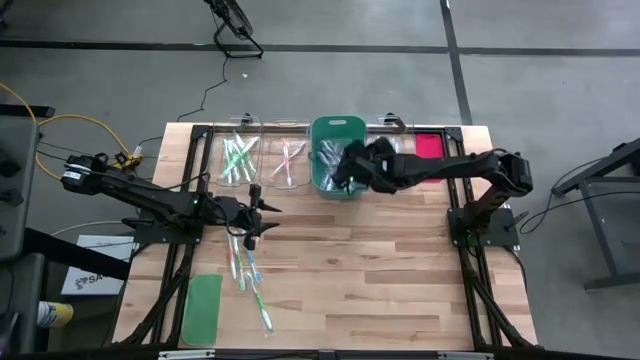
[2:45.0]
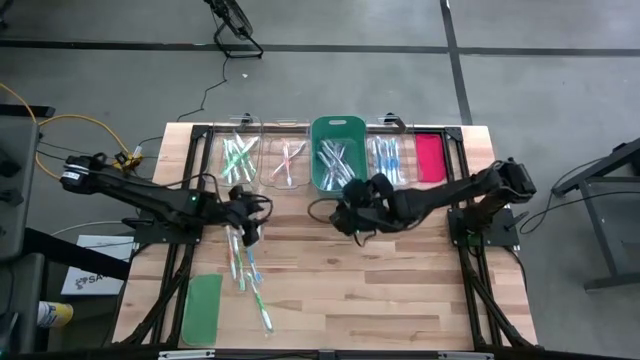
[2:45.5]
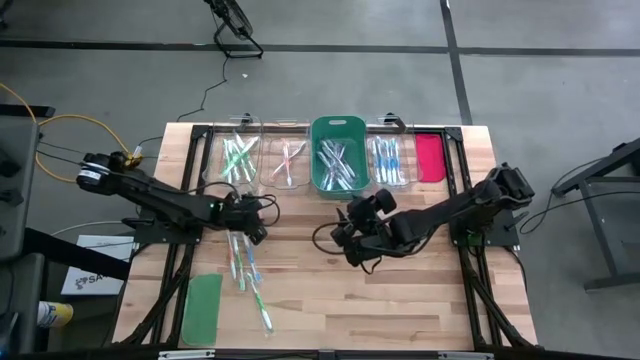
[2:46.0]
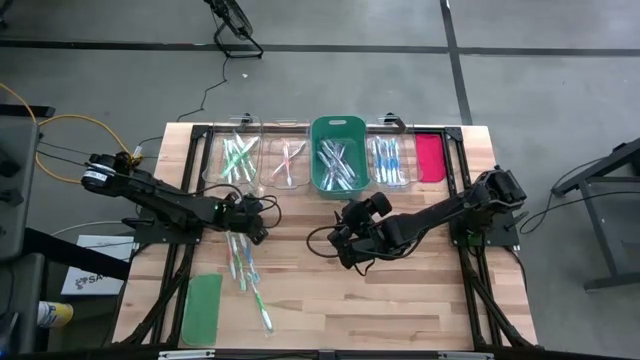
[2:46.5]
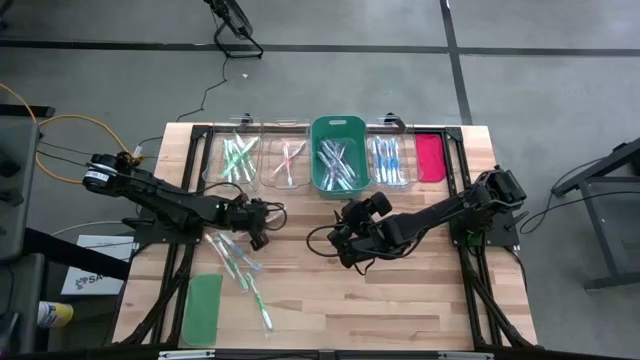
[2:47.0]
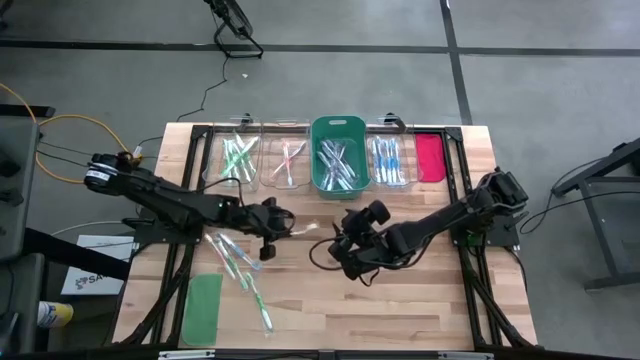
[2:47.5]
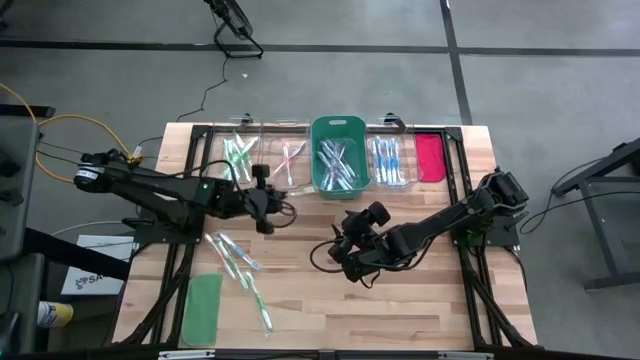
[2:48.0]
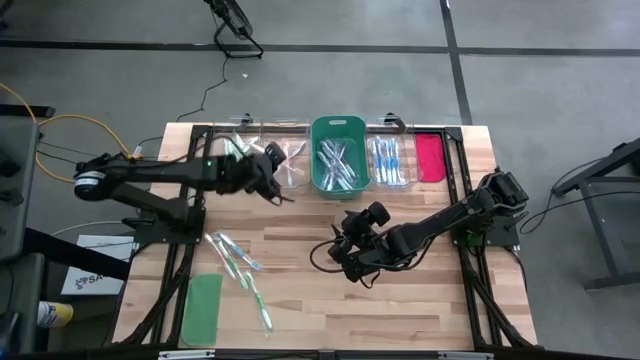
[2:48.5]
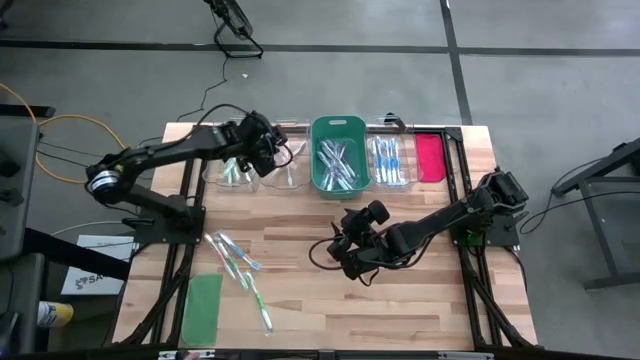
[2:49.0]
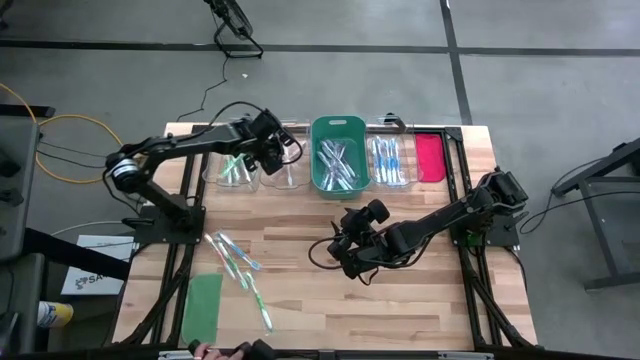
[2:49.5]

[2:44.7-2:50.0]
Task: Pick & Place Toothbrushes
Put the orange toothbrush into the middle transparent bin

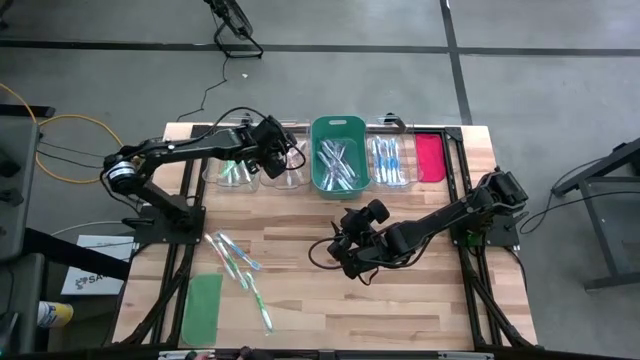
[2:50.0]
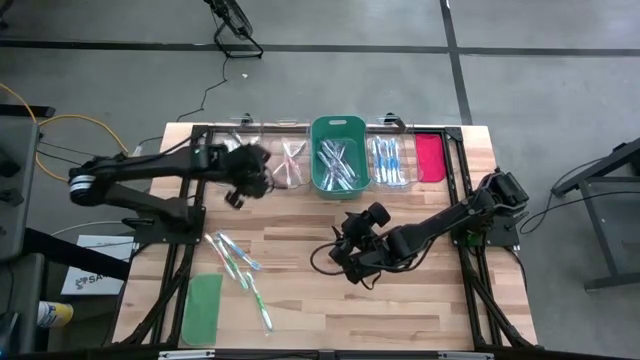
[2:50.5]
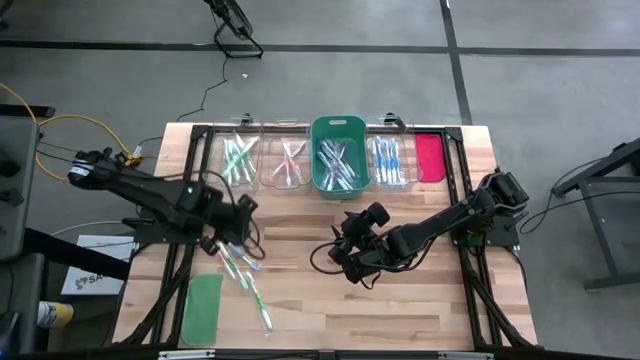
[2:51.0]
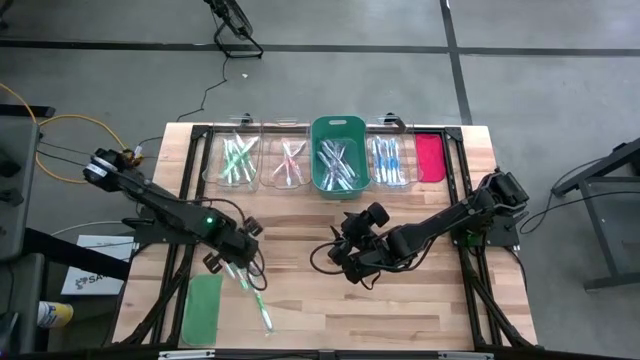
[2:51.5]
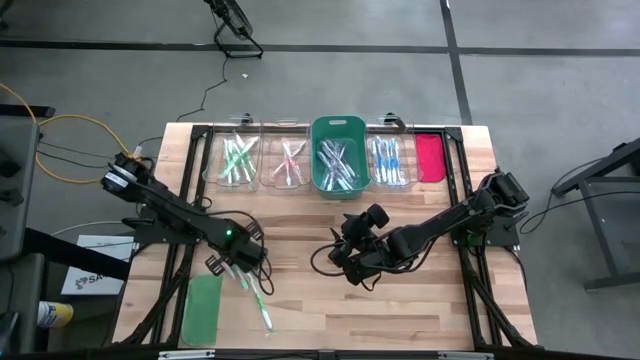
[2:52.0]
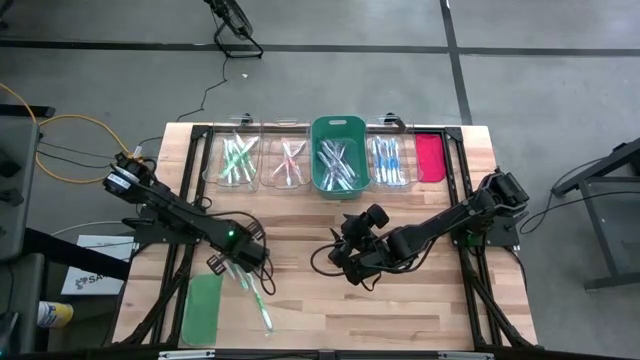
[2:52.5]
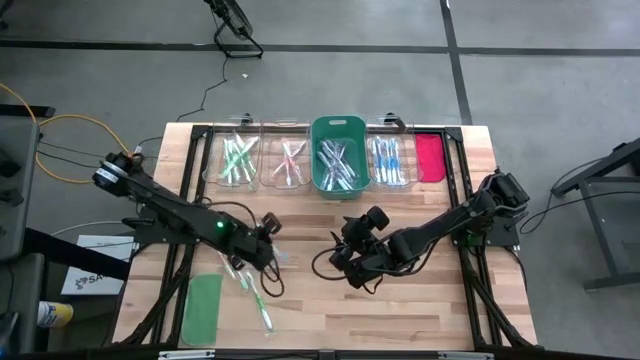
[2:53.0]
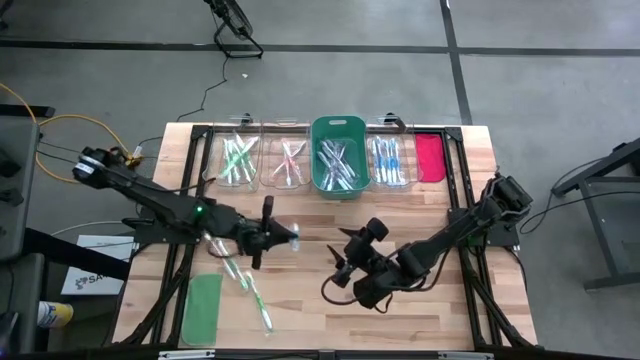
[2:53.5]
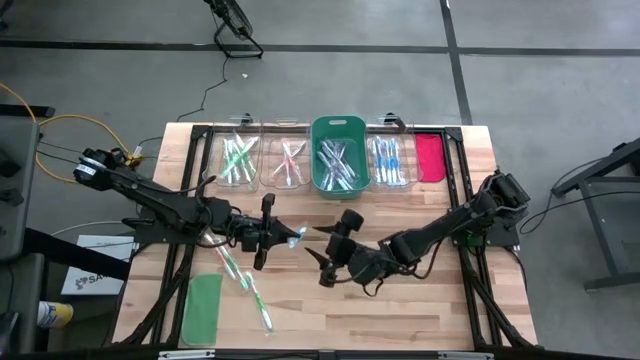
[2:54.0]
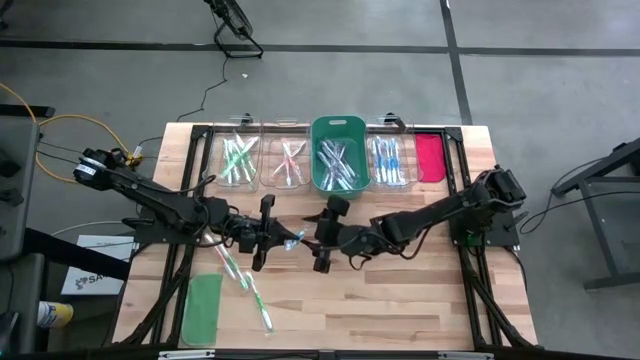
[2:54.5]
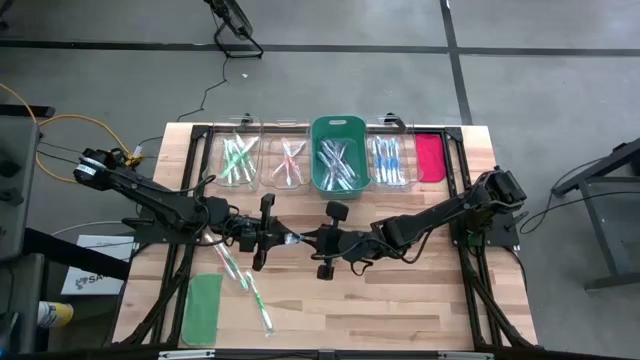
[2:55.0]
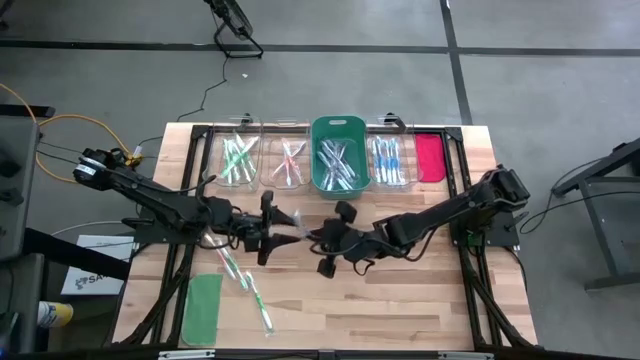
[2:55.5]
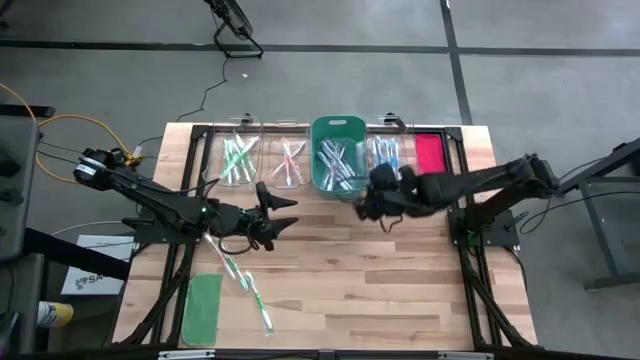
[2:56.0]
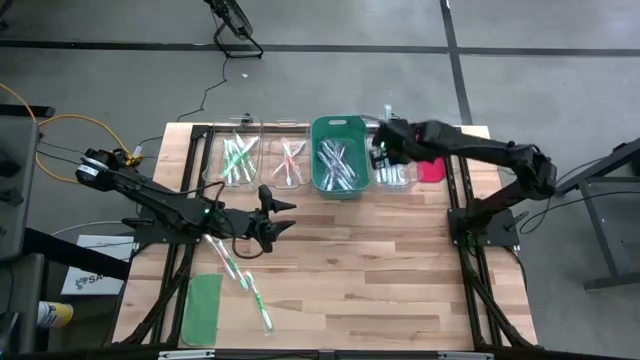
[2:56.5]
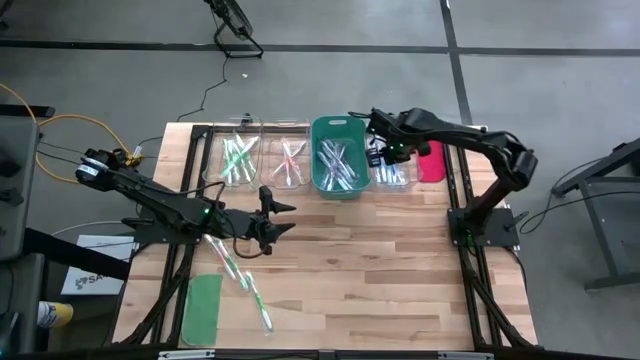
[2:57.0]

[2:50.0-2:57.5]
Put the blue toothbrush into the right transparent bin

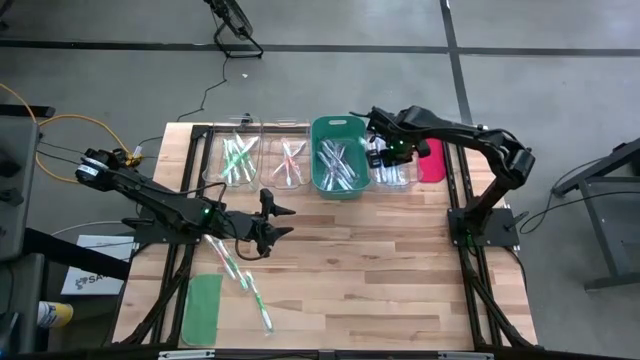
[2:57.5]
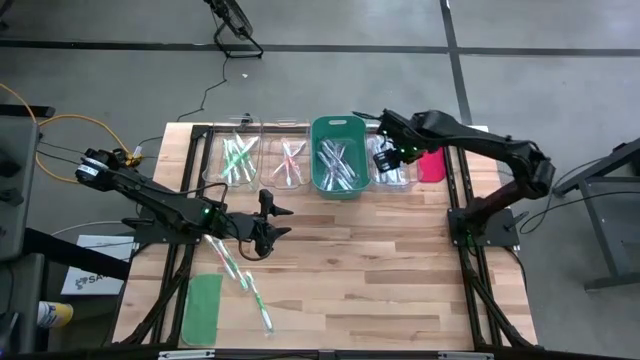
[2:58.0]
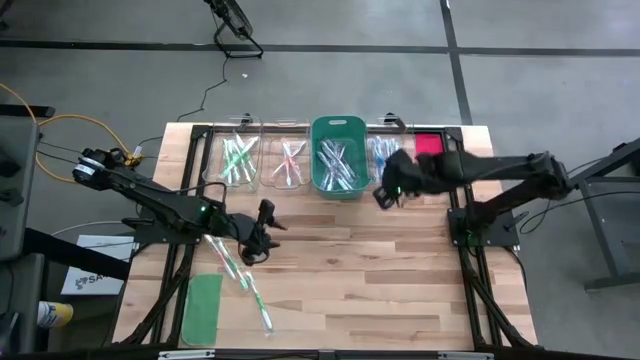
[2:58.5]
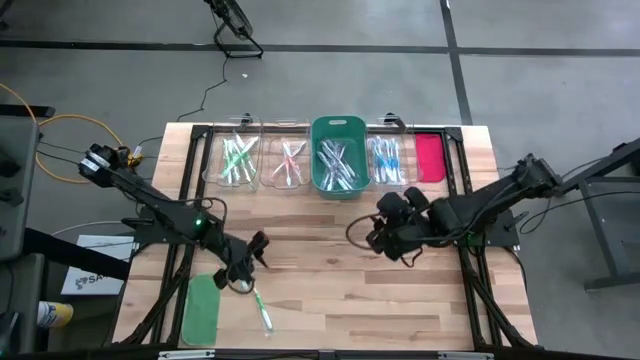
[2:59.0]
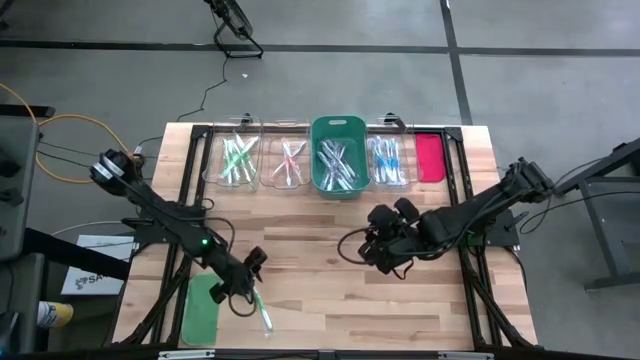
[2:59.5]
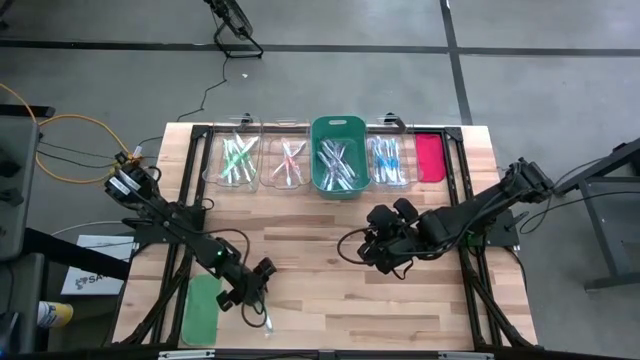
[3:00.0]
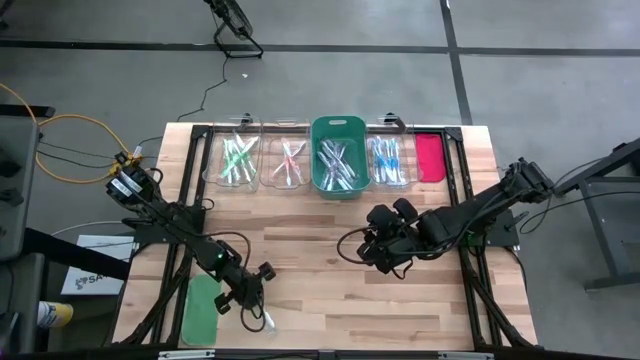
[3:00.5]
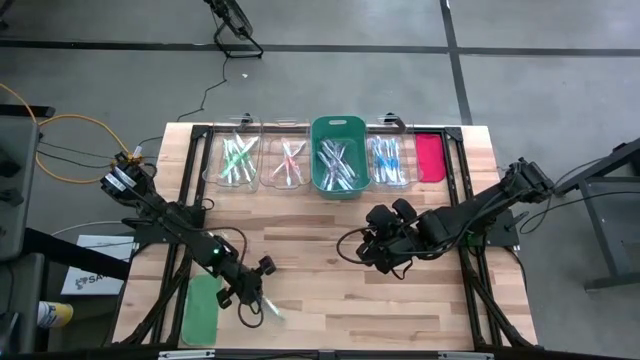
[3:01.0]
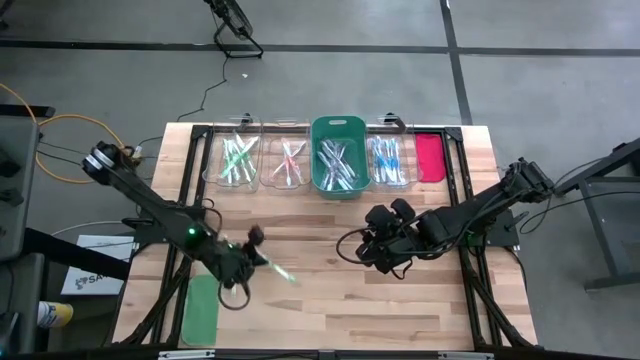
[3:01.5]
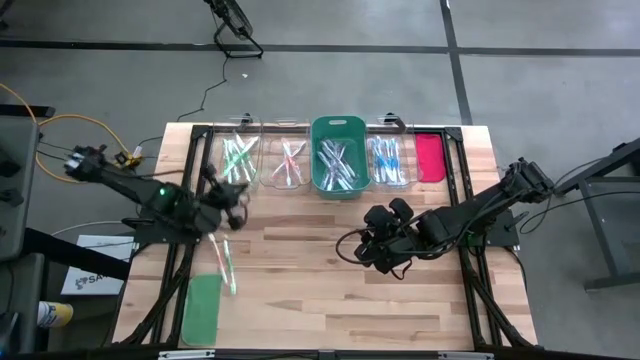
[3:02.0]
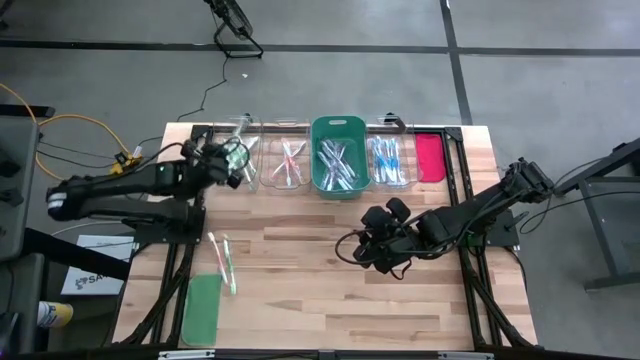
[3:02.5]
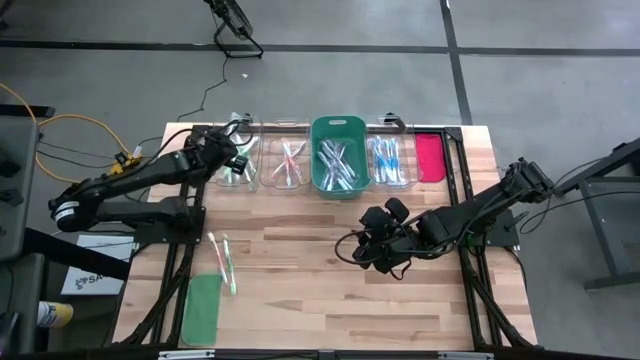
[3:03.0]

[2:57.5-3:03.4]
Put the green toothbrush into the left transparent bin

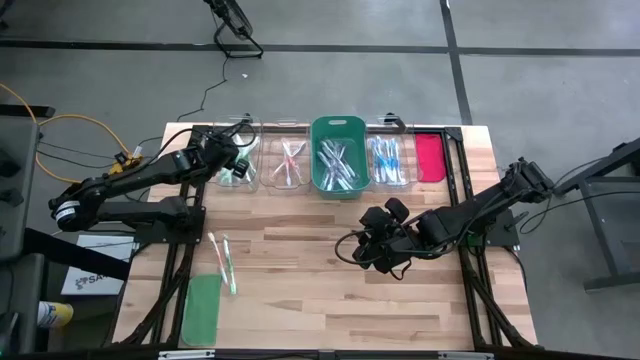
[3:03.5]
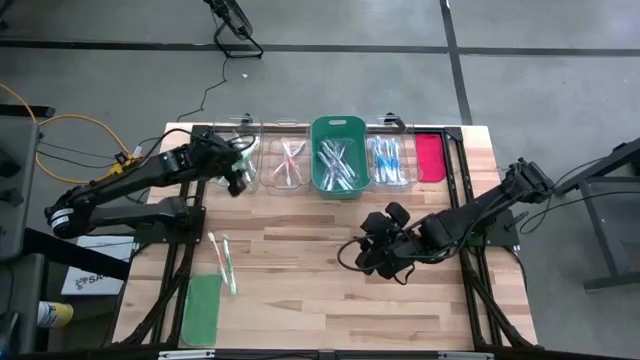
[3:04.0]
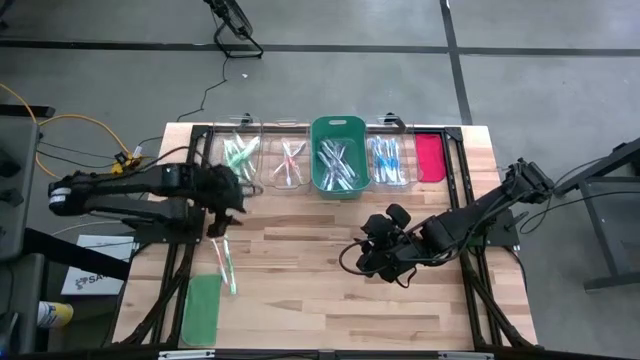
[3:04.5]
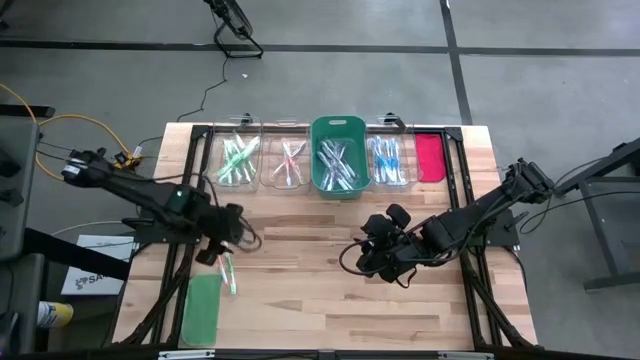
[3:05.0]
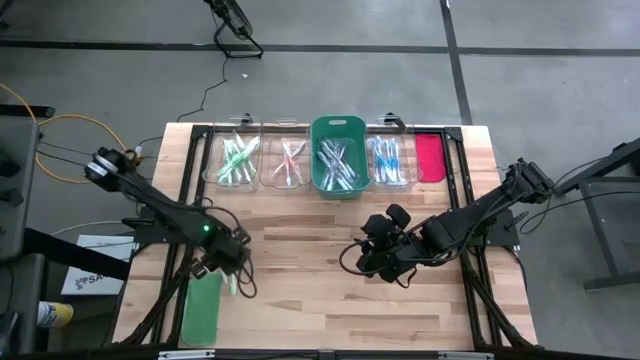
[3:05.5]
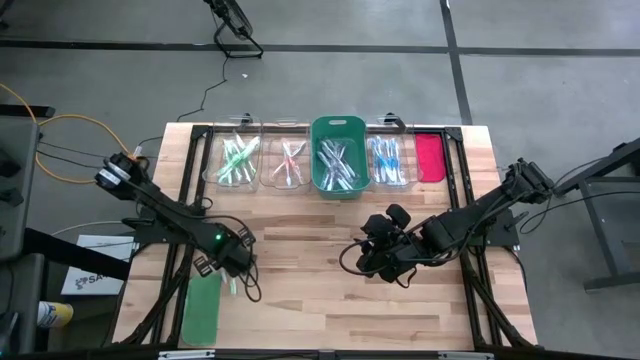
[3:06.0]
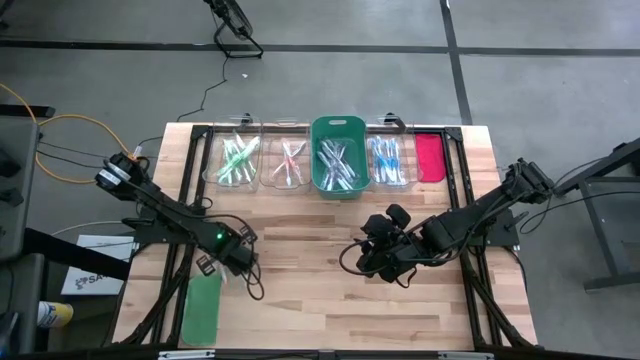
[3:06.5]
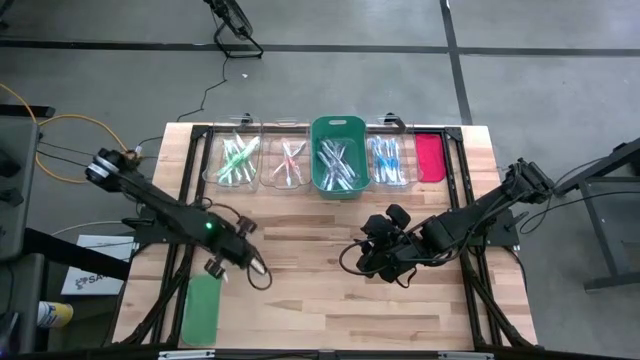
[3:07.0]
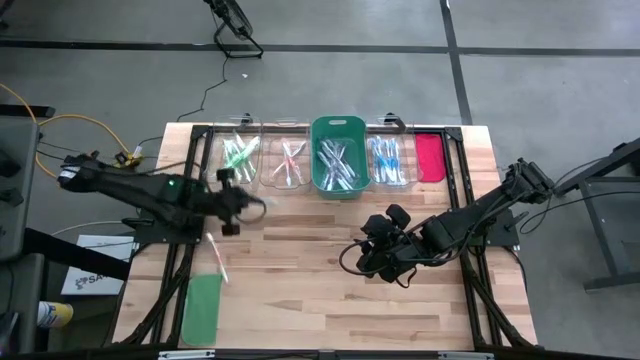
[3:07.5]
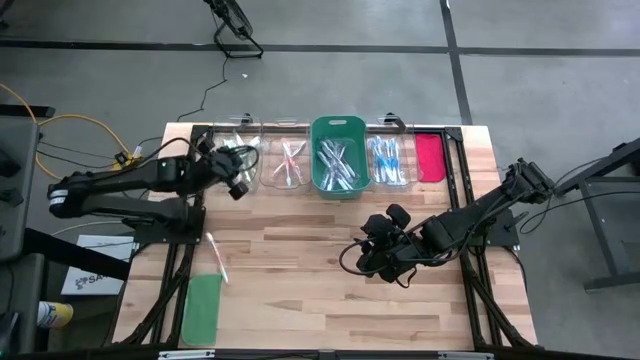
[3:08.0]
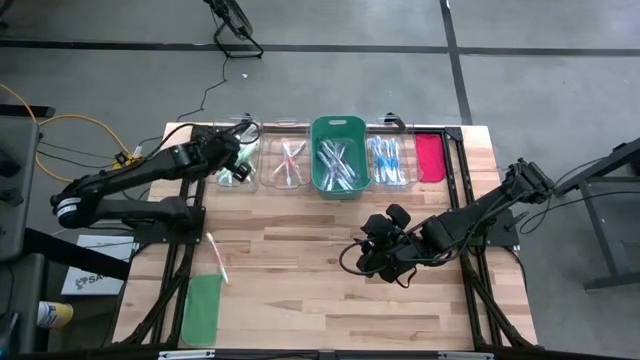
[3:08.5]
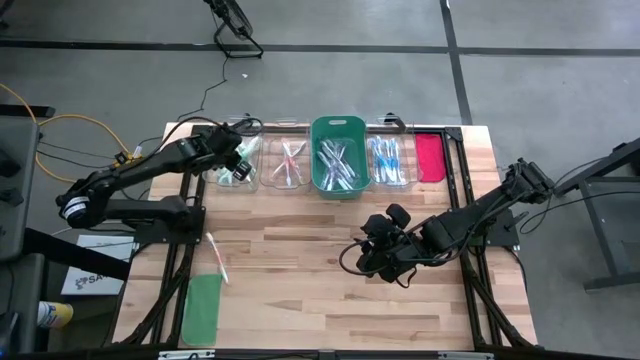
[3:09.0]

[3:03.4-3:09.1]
Put the green toothbrush into the left transparent bin
